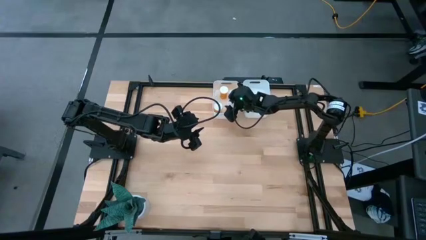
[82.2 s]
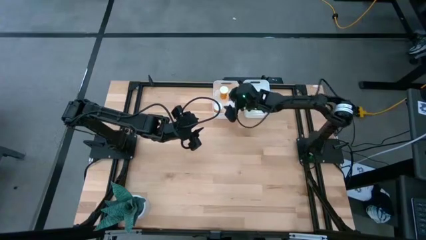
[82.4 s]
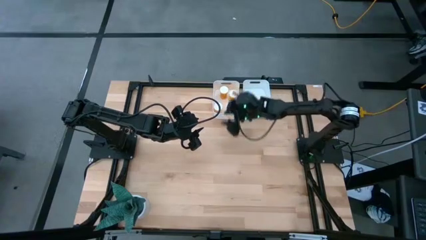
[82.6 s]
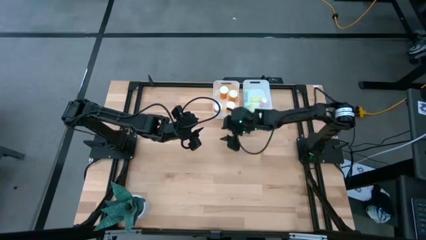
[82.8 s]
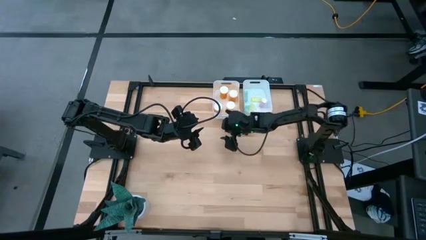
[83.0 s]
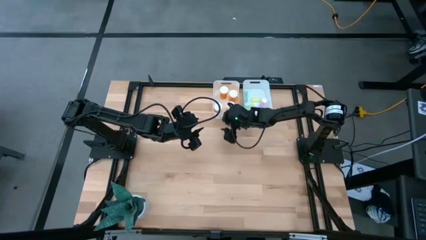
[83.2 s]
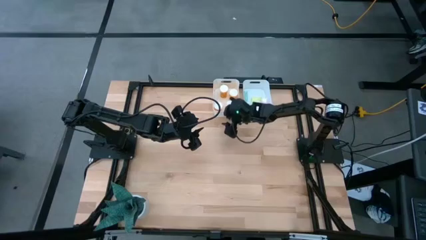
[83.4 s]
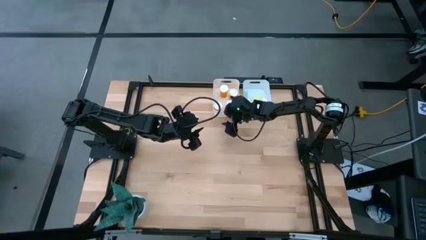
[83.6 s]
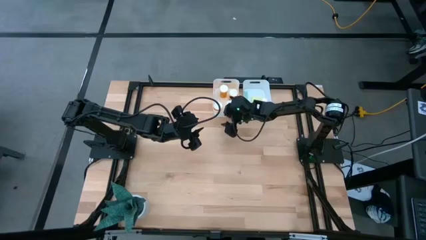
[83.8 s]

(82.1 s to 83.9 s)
Task: Pick and place medicine bottles into bin by pill shape (circle, oval)
Adjust the left white bin

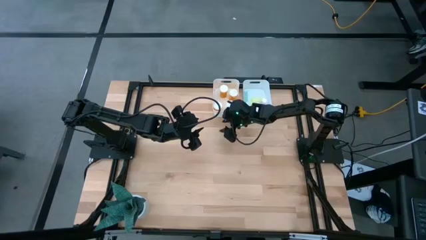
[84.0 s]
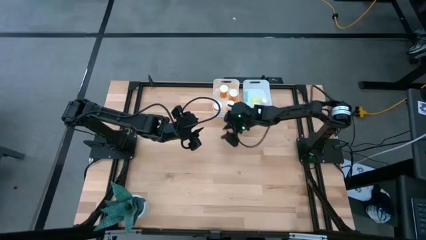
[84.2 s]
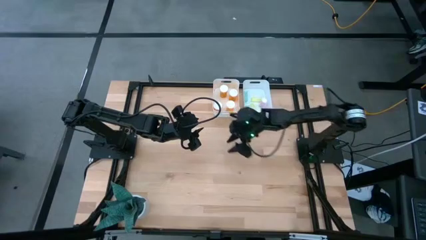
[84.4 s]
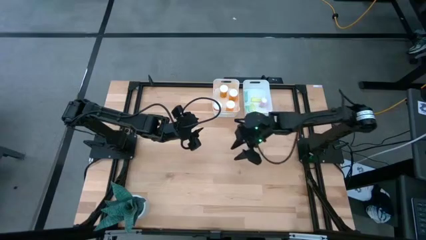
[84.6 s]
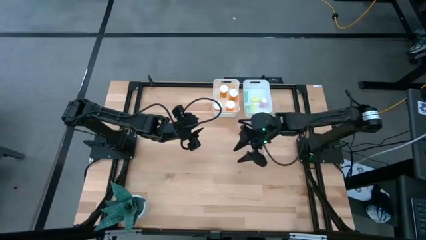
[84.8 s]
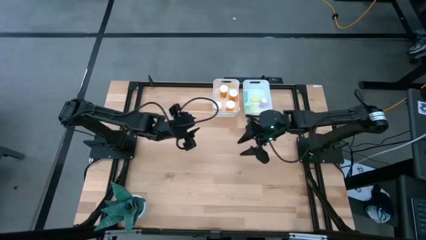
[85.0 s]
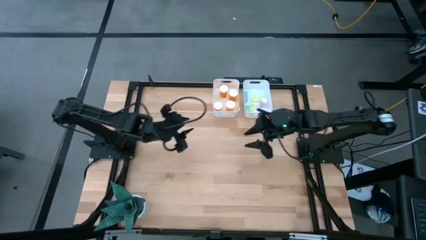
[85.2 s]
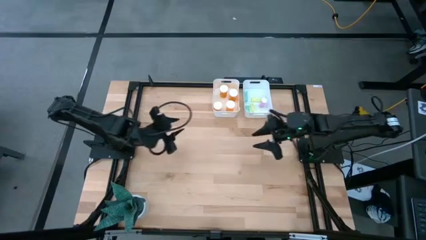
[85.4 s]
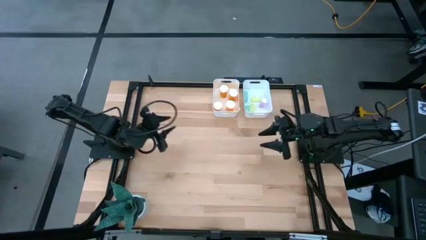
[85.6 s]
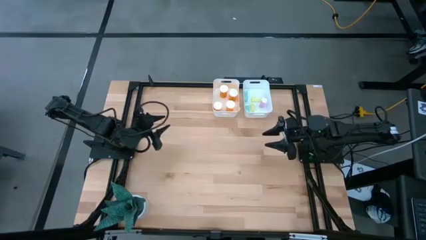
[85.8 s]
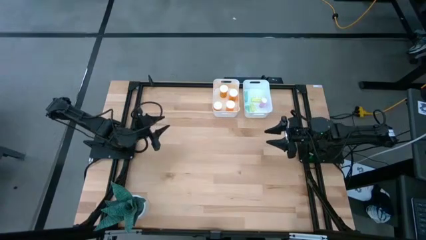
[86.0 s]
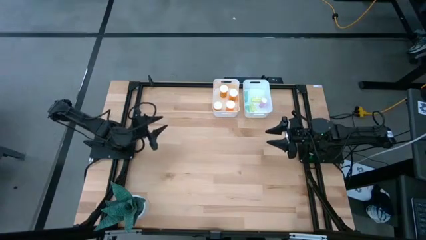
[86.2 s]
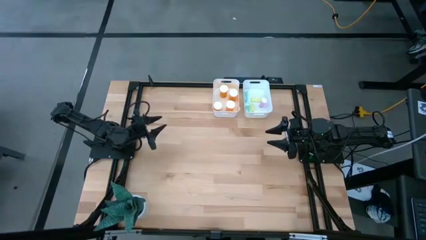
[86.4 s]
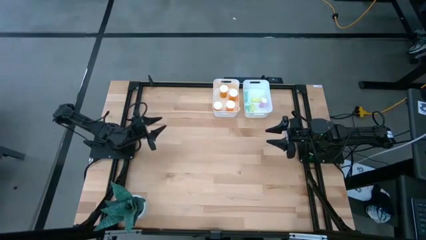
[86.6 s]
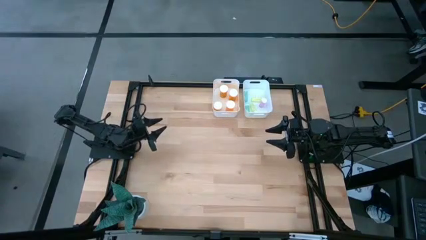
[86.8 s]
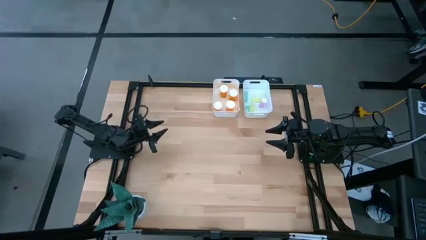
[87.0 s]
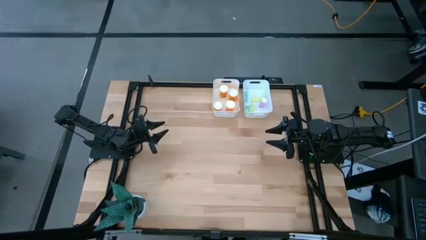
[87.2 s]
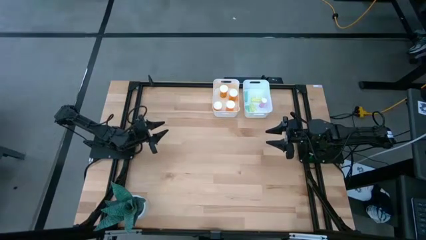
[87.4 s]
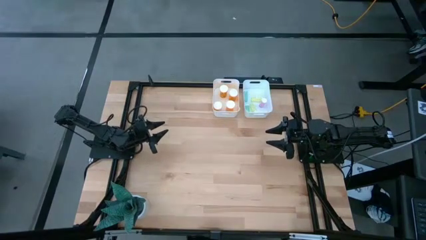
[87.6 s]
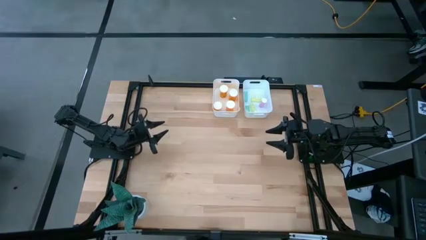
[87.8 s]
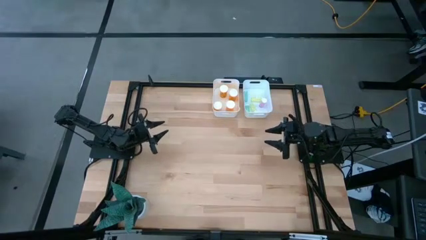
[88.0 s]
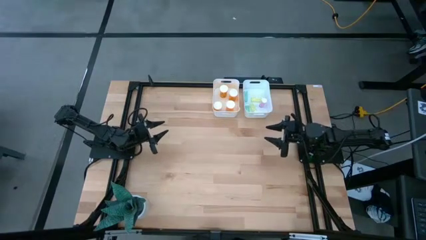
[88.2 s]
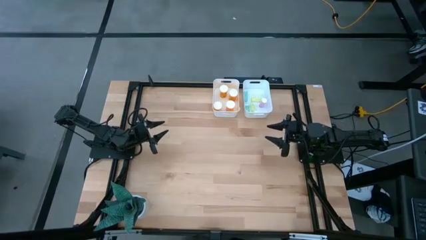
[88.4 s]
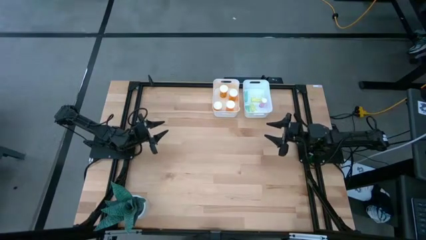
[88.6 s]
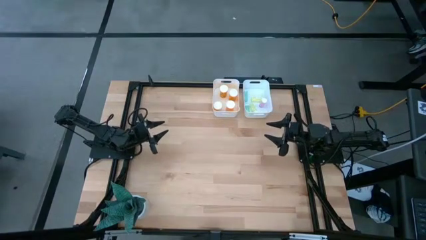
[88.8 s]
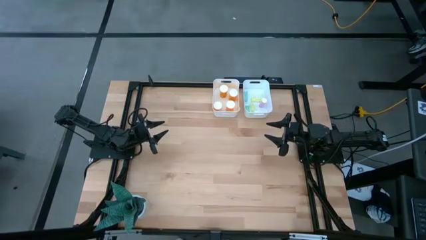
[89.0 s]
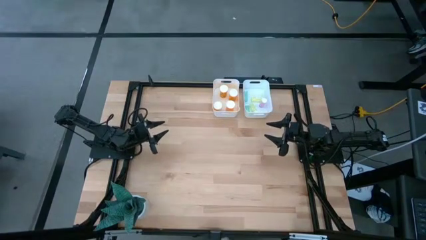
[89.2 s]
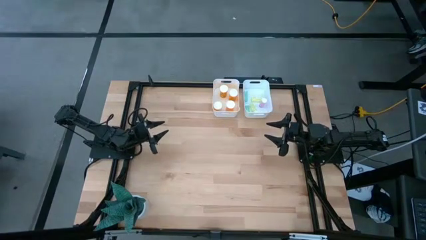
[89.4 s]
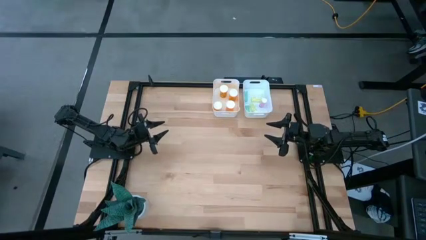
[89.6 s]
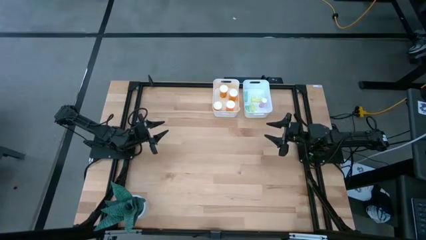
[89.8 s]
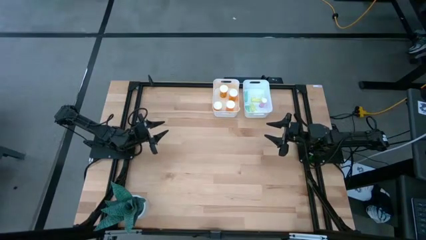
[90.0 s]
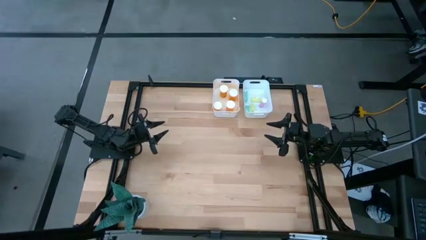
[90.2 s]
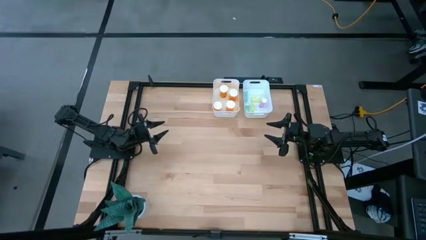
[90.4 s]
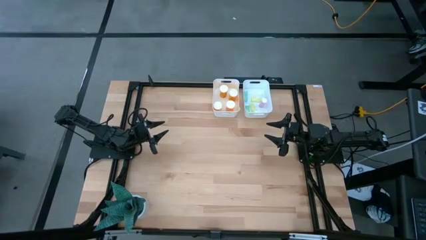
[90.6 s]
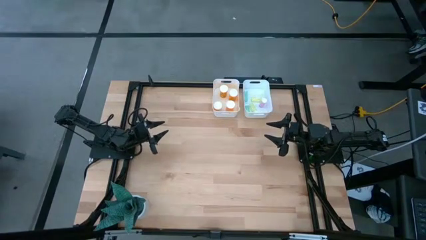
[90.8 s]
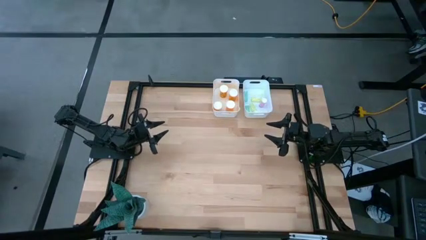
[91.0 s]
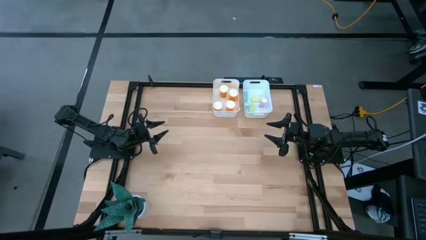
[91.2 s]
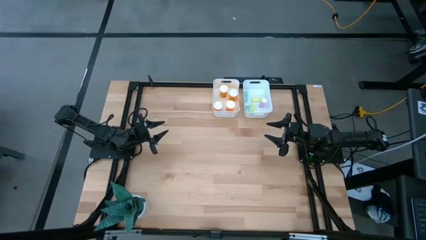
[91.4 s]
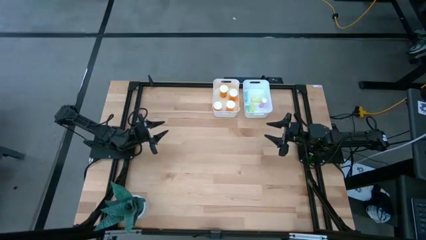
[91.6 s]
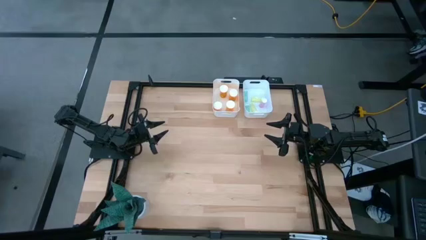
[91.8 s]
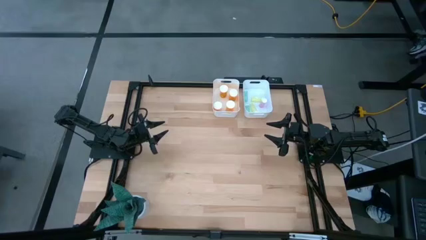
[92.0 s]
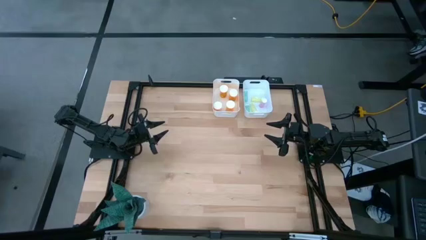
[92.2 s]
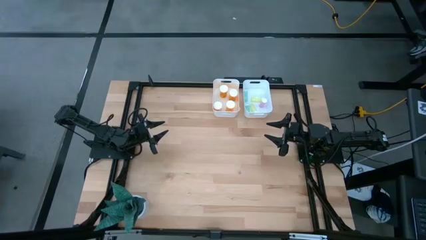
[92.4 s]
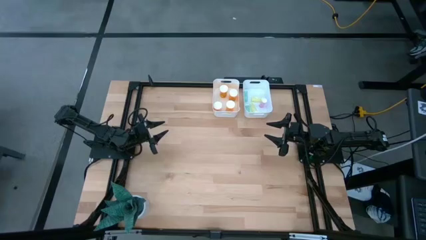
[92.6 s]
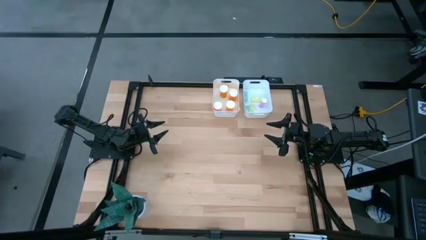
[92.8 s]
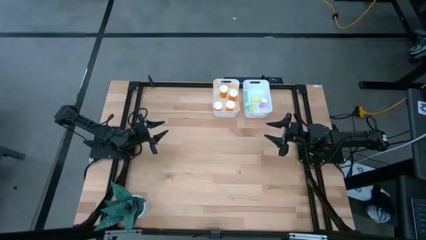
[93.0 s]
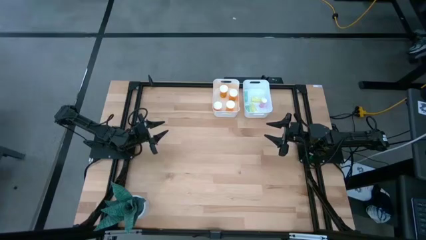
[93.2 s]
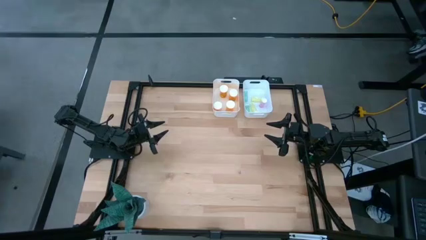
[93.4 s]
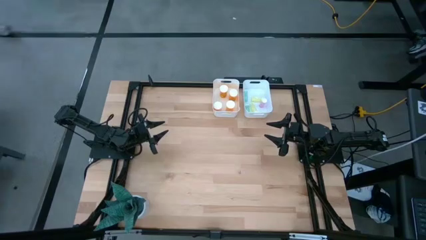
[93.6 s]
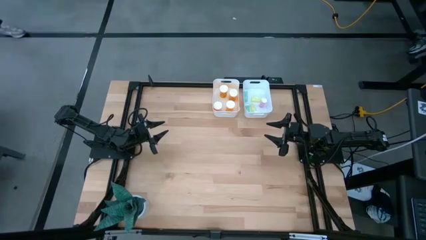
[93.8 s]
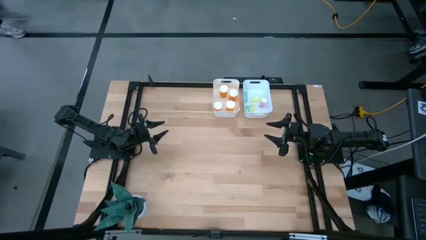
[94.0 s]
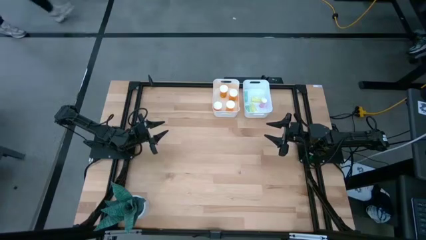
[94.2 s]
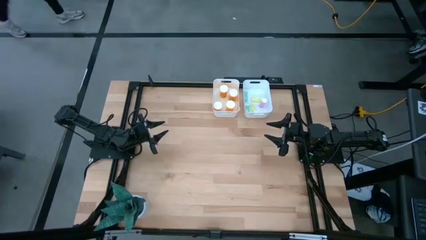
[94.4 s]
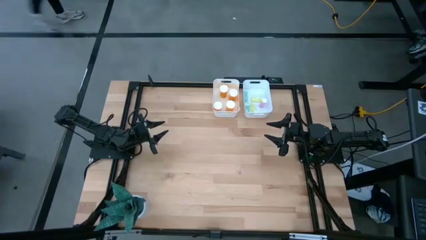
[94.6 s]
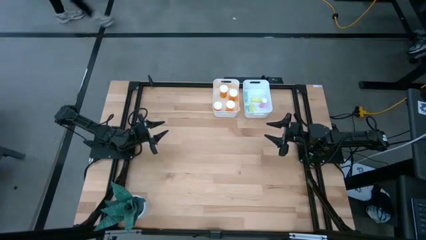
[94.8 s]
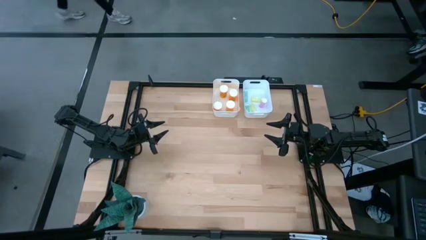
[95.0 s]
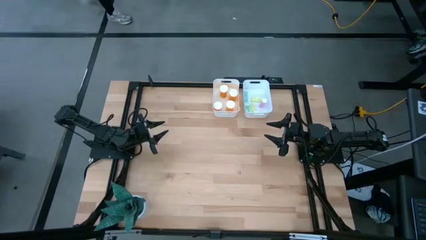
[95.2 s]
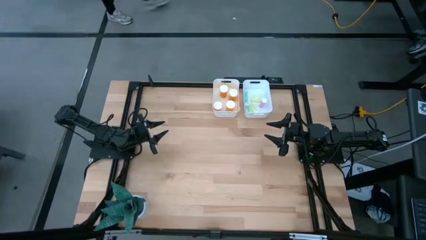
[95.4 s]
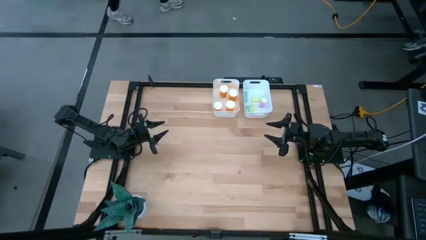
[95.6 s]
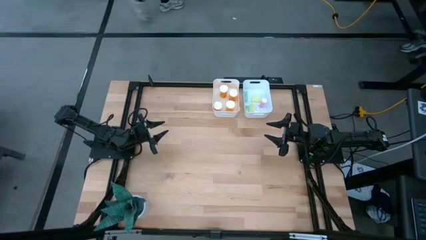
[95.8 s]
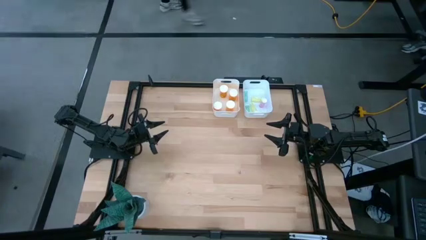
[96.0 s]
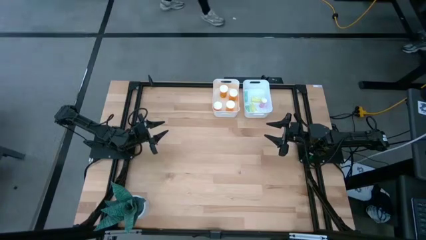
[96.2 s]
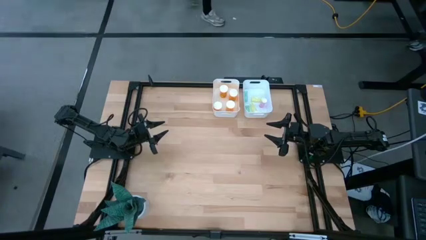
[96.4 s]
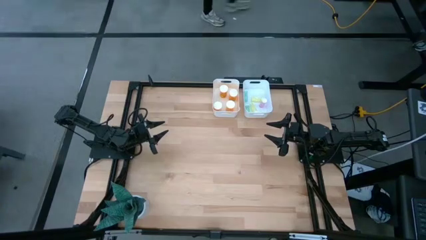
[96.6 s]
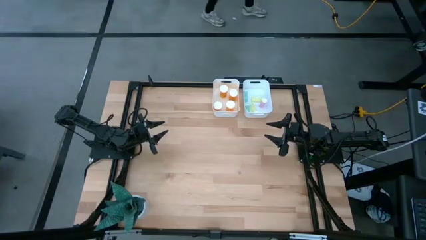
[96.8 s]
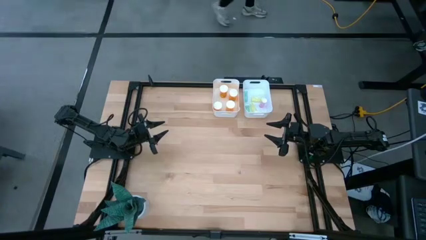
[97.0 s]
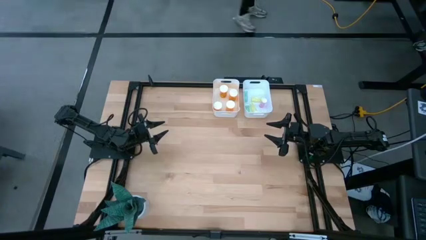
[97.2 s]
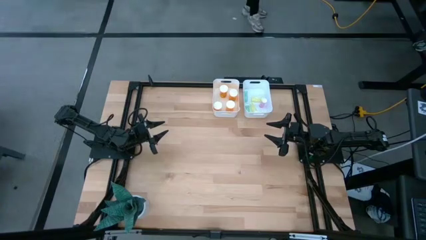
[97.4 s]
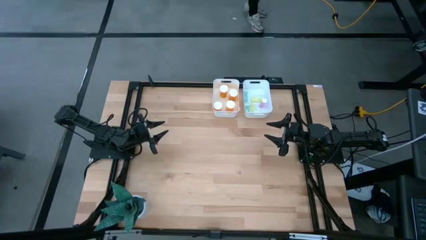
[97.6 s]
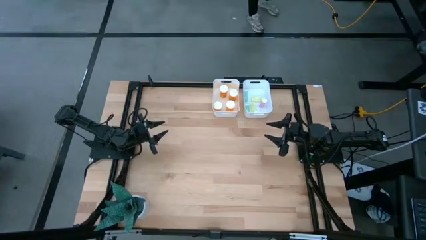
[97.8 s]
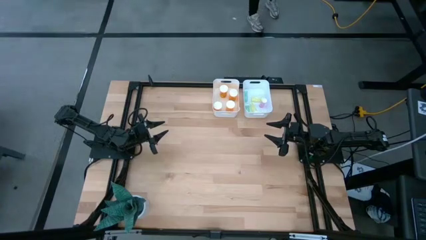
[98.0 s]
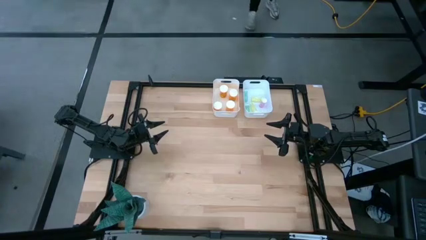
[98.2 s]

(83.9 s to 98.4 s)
Return to Home Position
